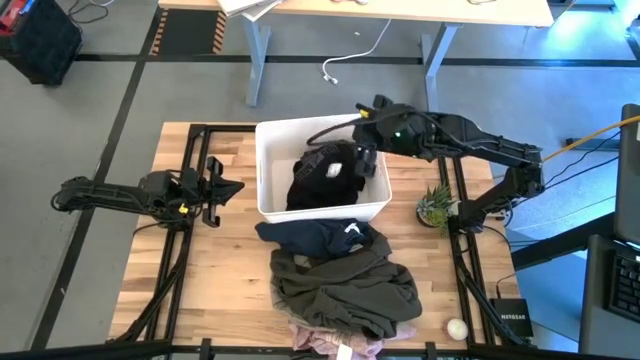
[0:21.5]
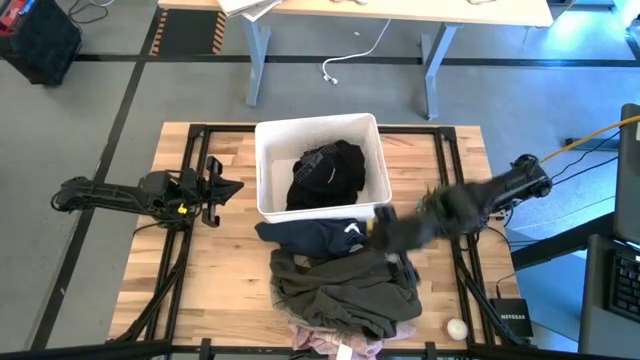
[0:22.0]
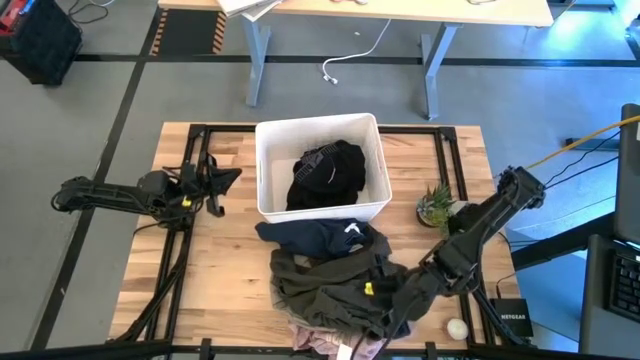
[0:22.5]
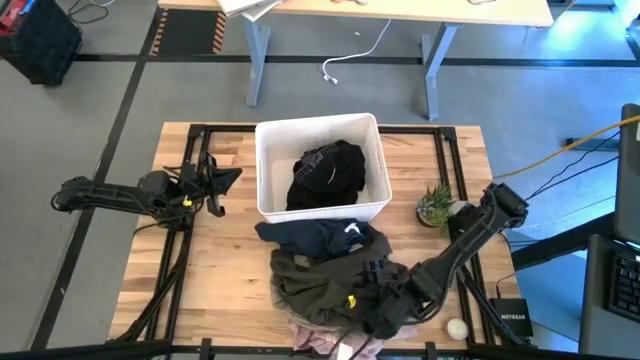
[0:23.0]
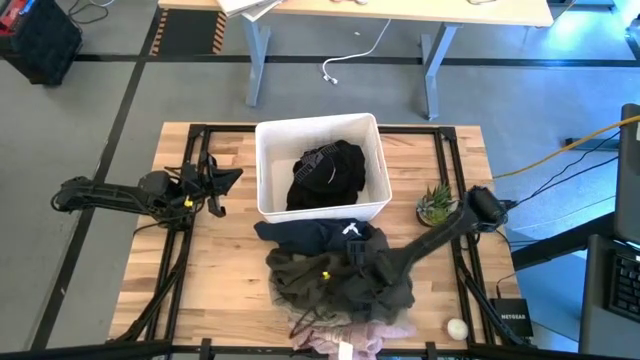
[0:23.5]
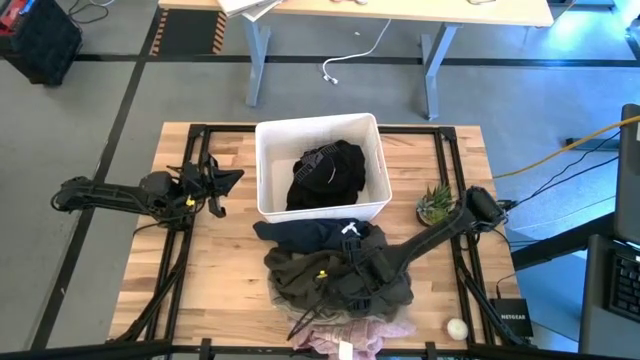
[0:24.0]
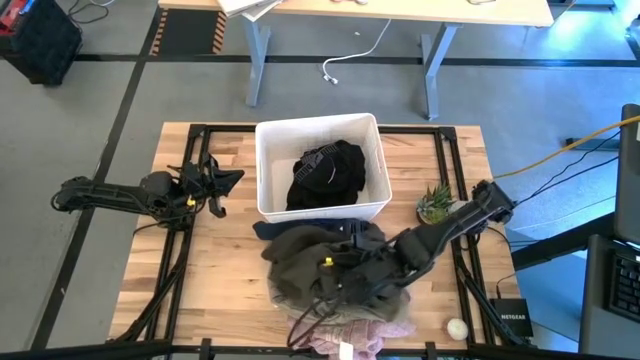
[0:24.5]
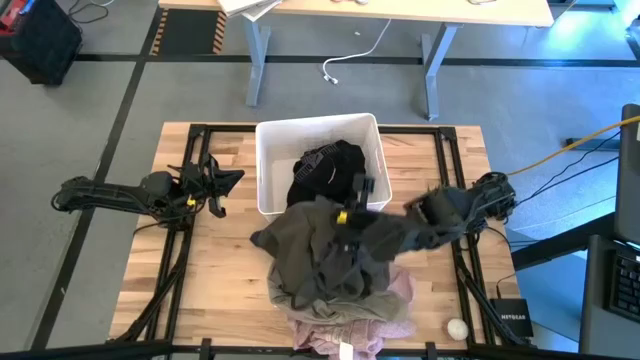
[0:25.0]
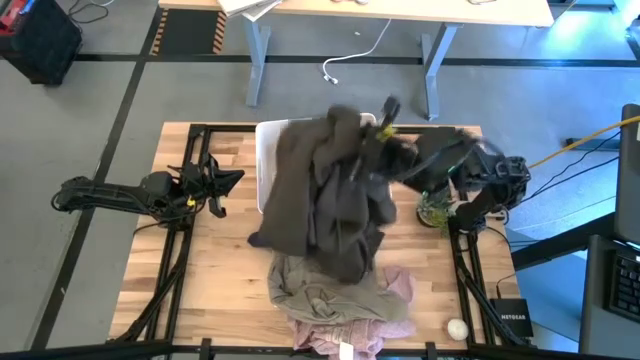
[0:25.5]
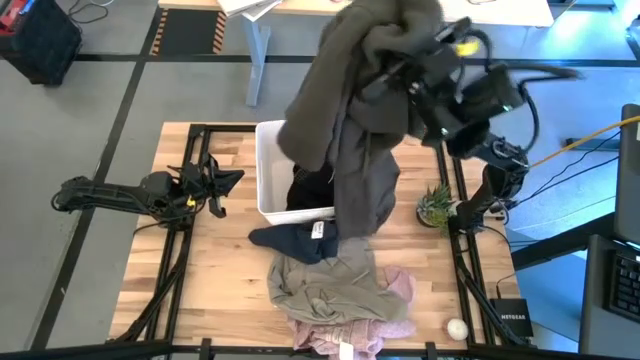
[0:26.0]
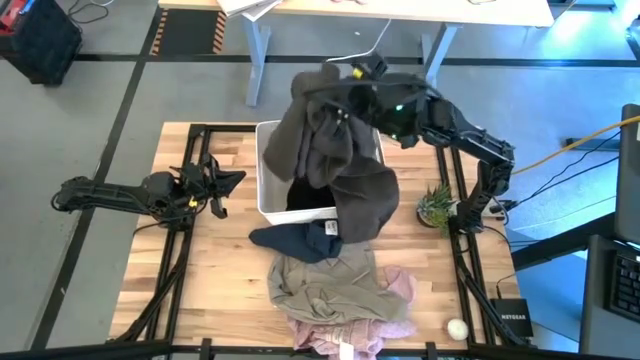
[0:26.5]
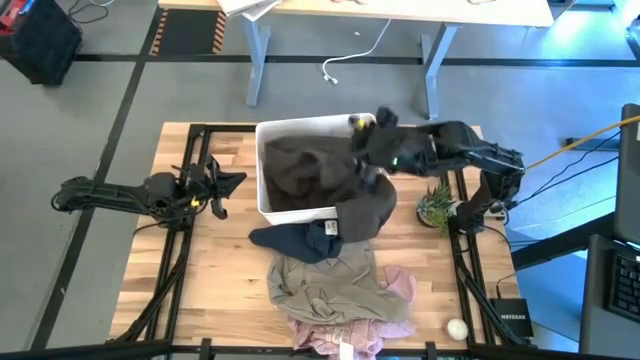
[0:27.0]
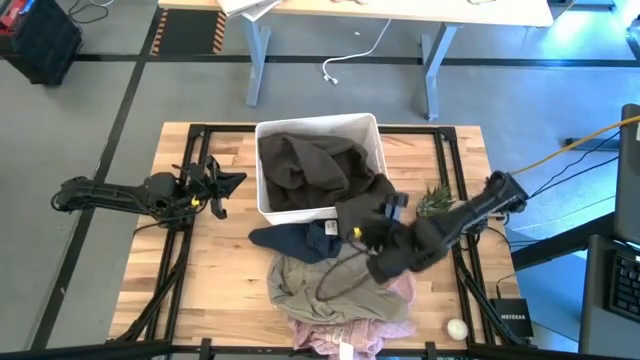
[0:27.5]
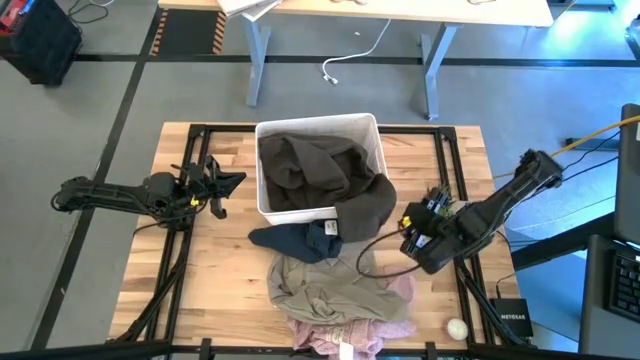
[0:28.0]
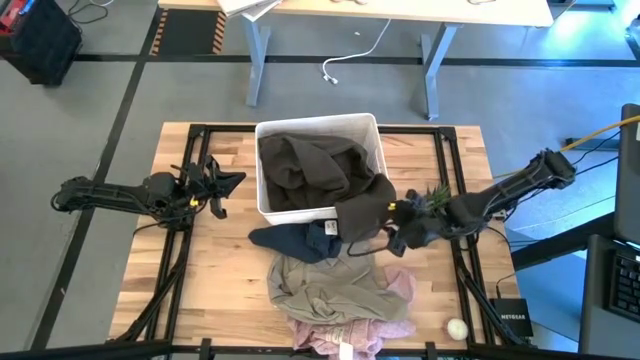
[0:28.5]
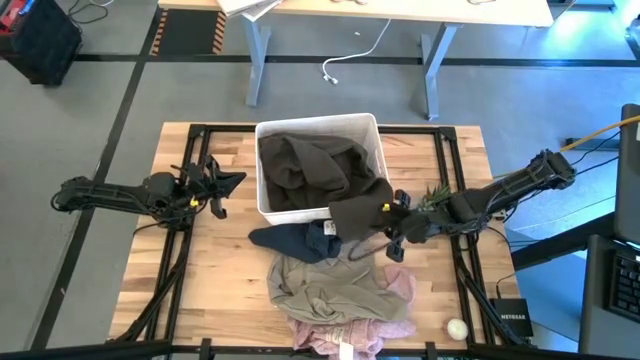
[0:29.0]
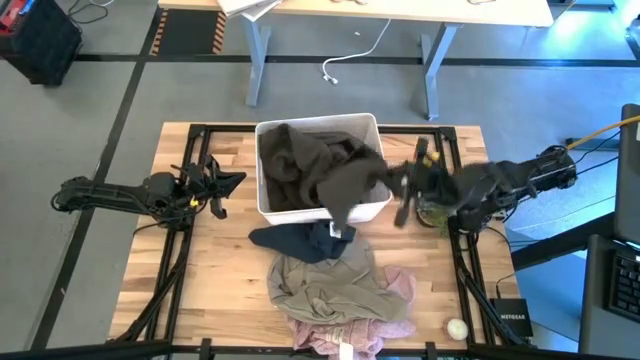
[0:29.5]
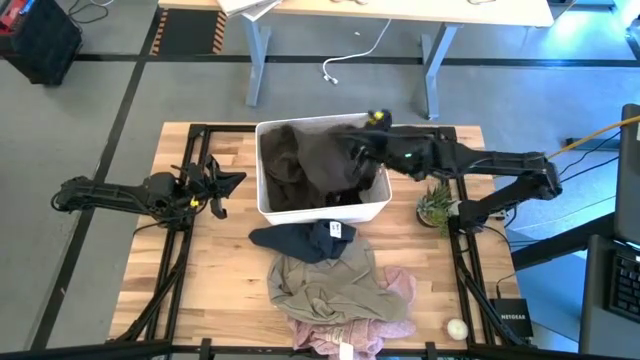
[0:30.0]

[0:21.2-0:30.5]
Task: Sort clothes
Put the gray jacket into the laundry bin

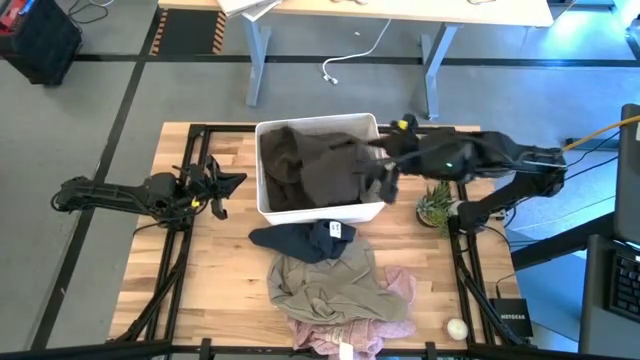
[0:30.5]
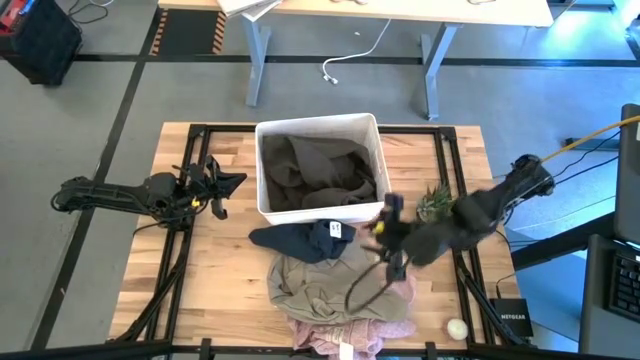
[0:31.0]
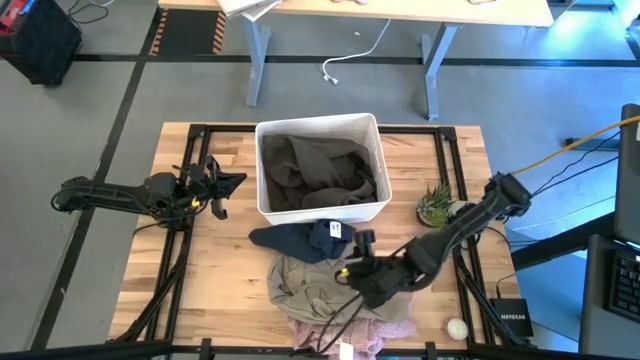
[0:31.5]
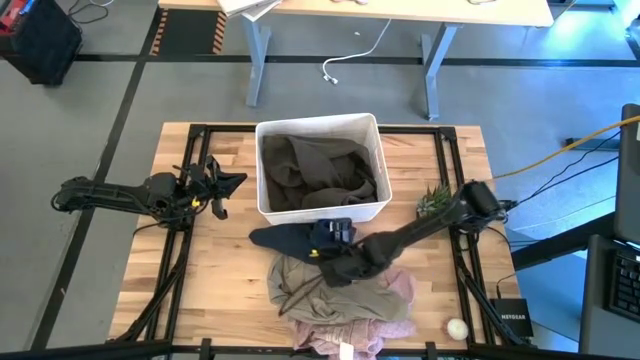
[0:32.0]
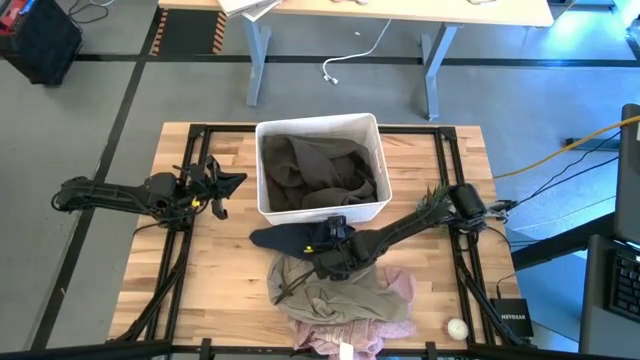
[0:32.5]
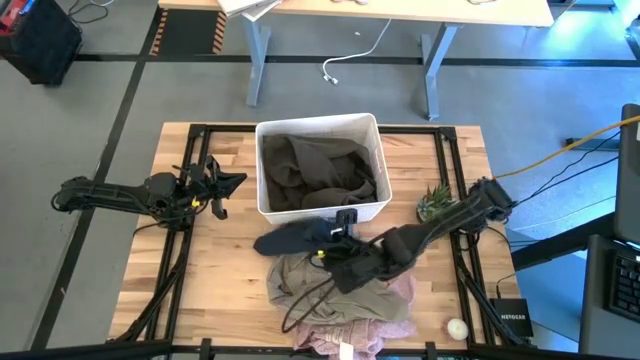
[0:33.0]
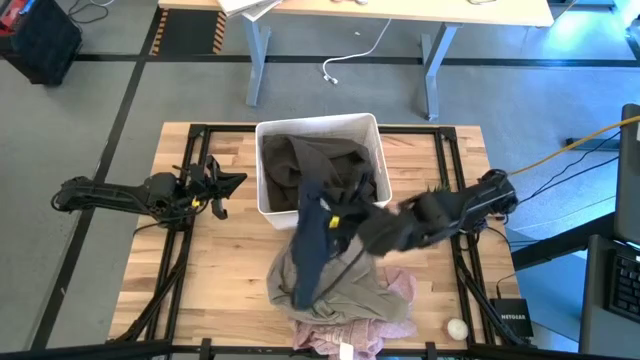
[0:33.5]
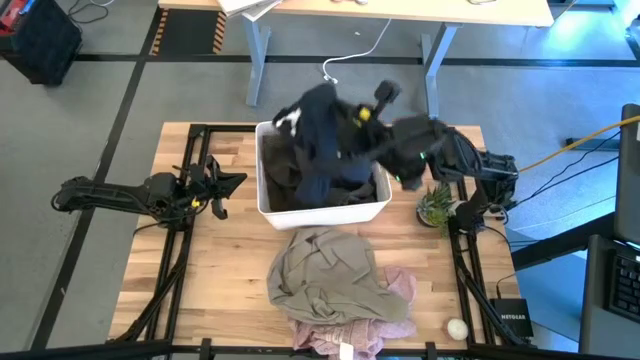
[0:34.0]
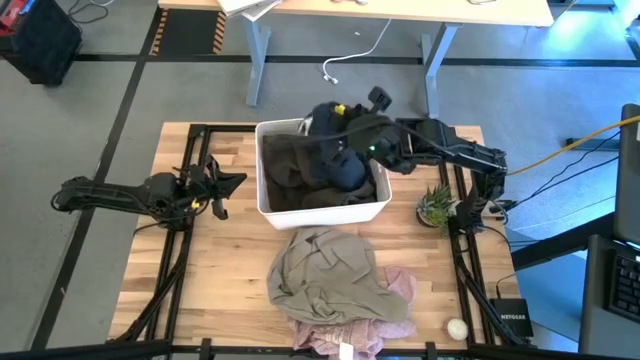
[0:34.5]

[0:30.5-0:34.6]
Put the blue shorts into the laundry bin

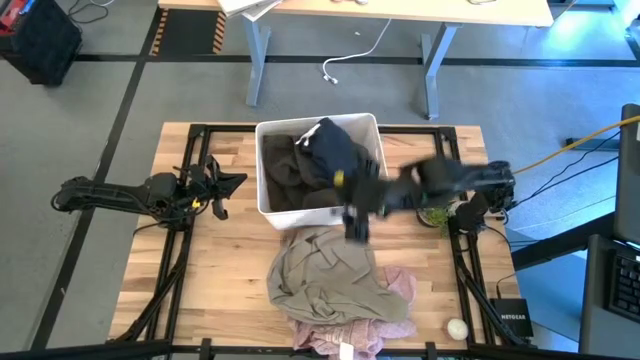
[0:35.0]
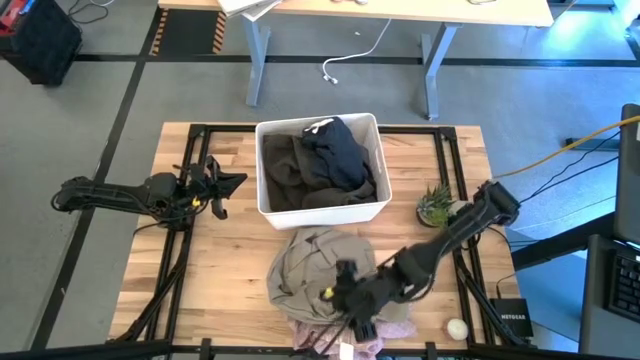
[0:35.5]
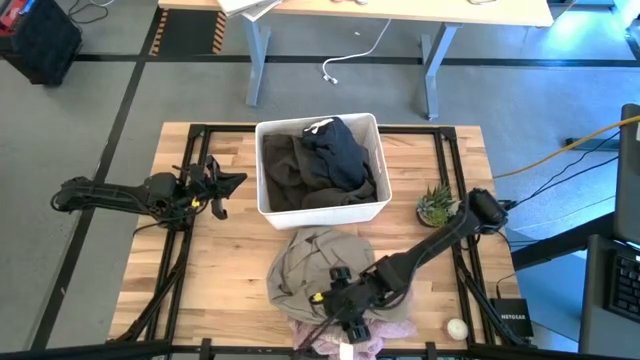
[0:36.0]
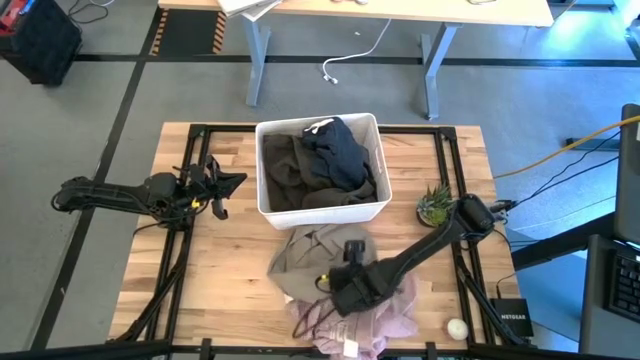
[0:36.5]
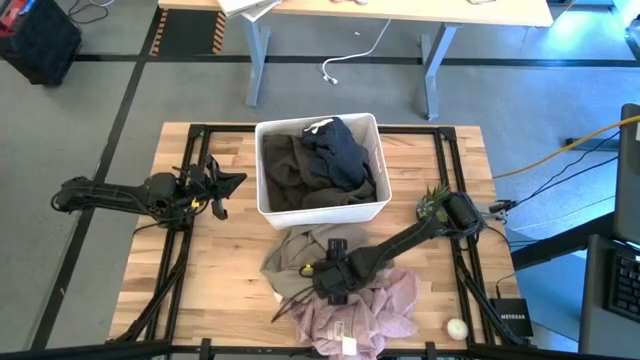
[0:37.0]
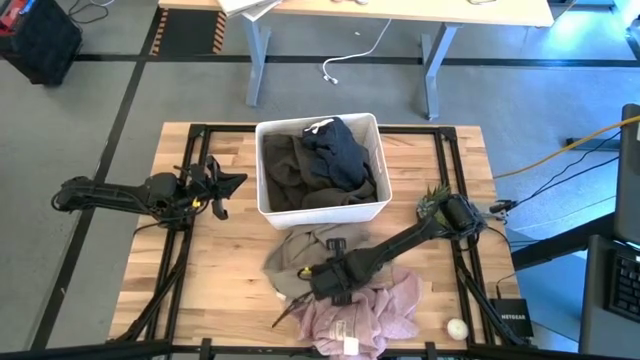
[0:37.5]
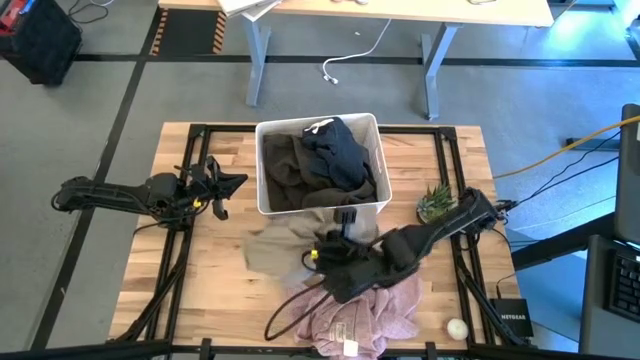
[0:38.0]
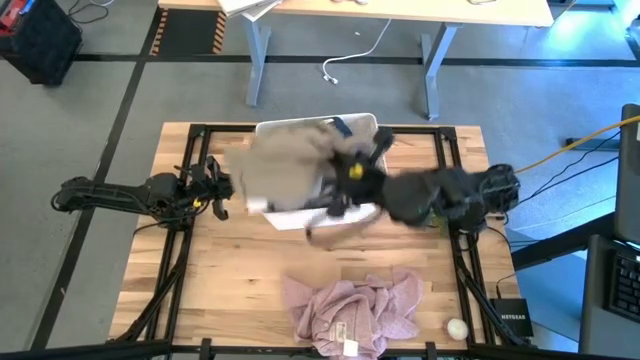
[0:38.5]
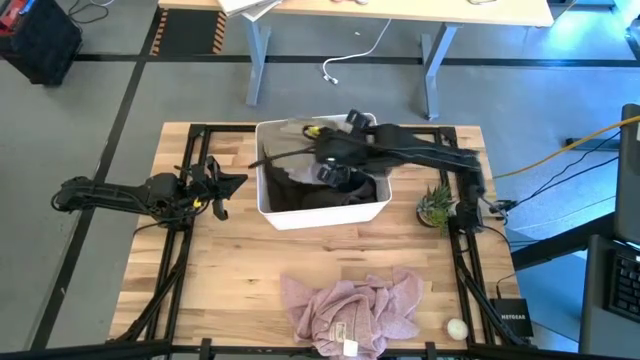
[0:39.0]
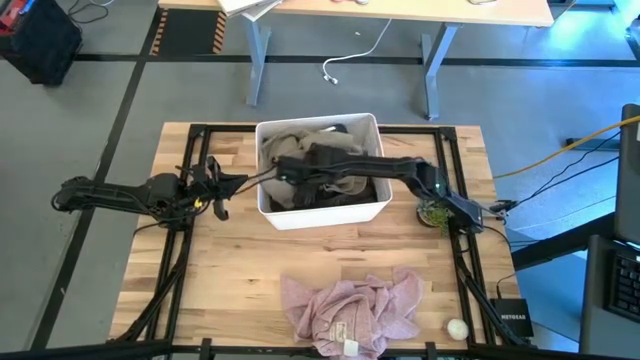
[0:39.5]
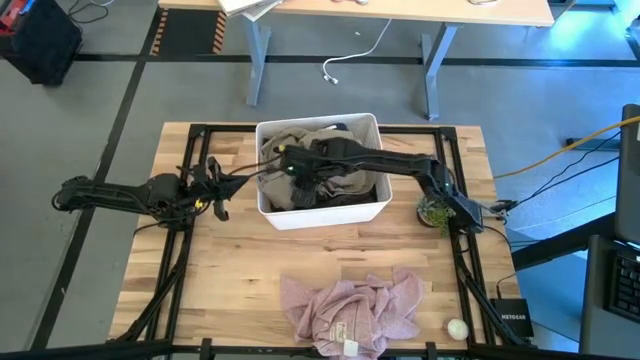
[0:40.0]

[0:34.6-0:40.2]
Put the brown pants into the laundry bin

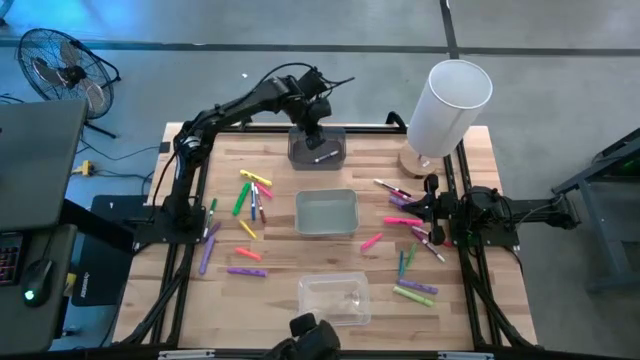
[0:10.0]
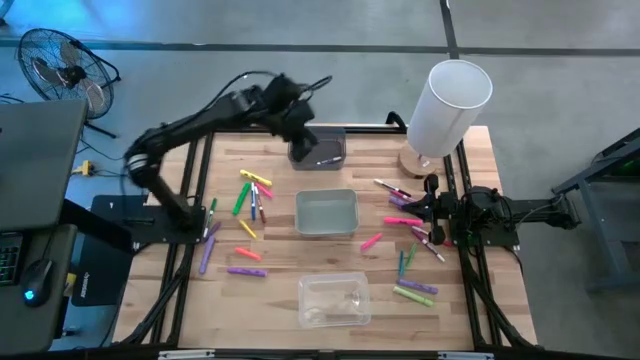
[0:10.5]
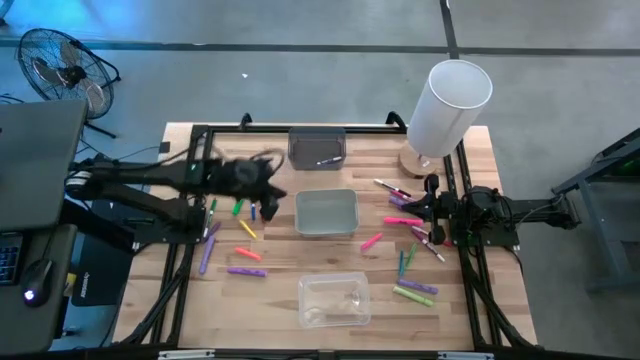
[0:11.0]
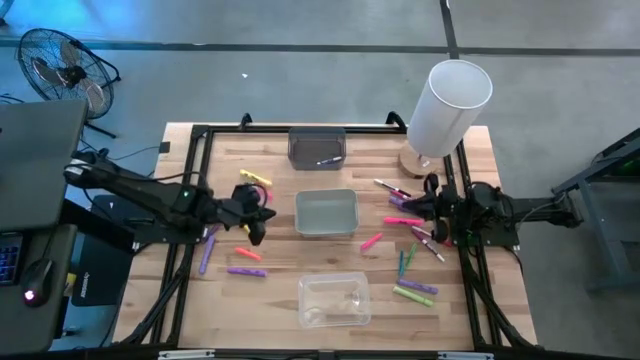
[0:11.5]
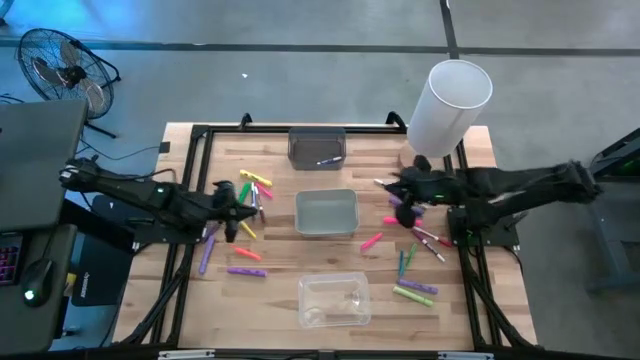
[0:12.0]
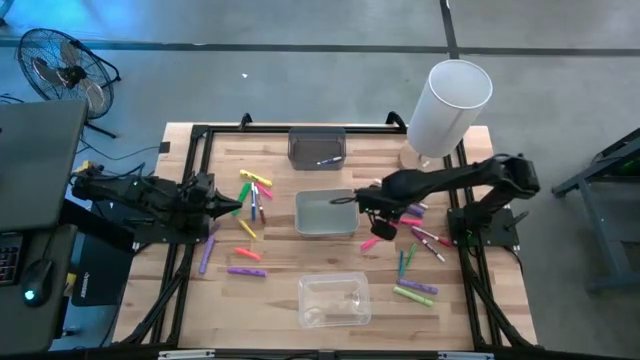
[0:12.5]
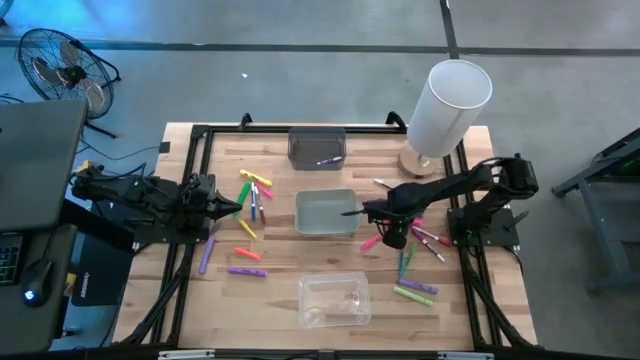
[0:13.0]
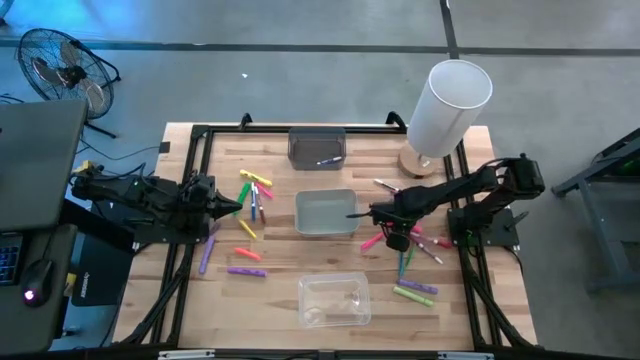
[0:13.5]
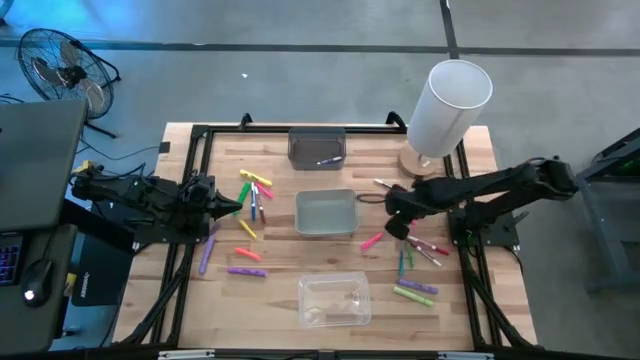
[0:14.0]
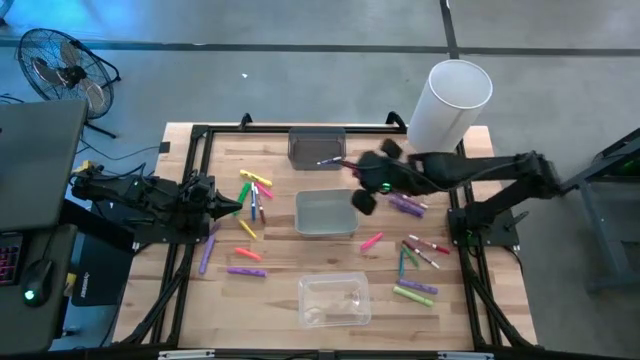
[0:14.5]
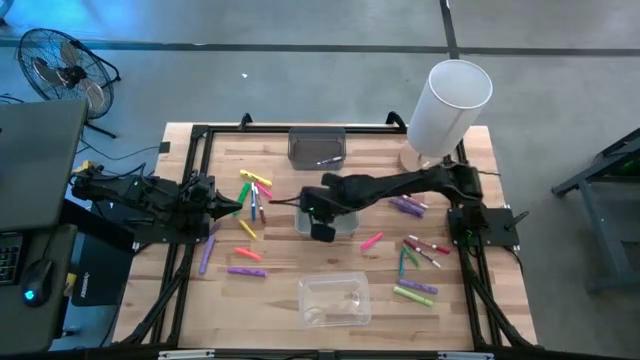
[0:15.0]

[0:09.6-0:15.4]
Task: Pick & Place Markers
Put the pink highlighter pen into the gray bin
